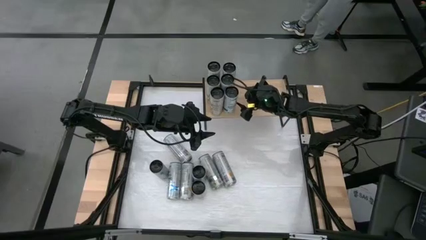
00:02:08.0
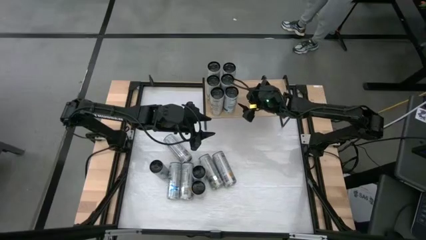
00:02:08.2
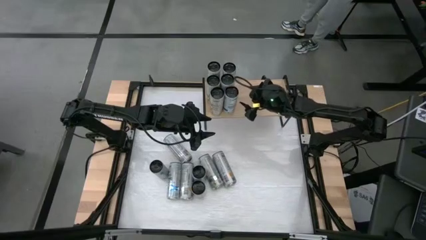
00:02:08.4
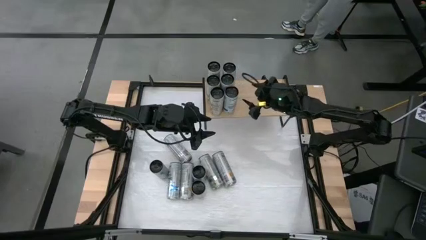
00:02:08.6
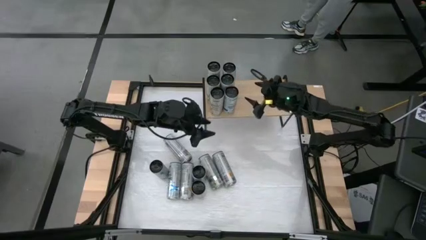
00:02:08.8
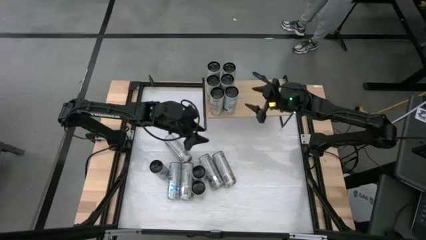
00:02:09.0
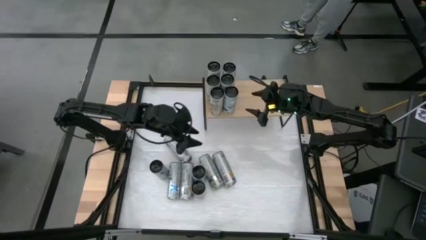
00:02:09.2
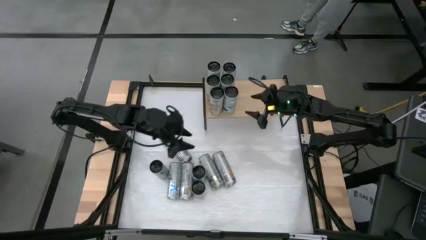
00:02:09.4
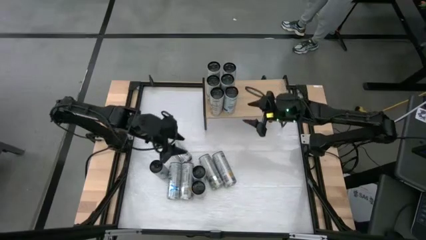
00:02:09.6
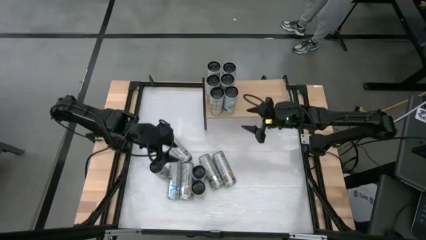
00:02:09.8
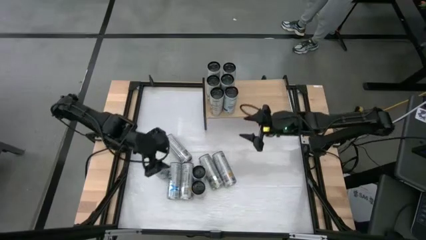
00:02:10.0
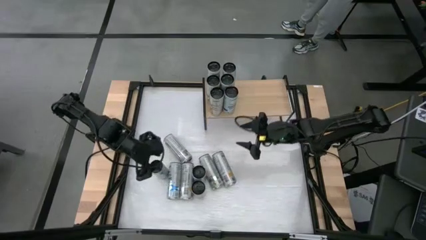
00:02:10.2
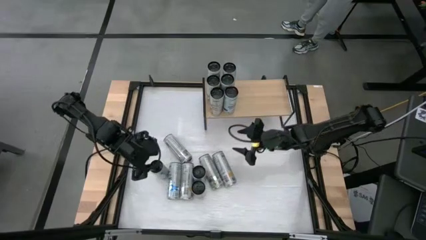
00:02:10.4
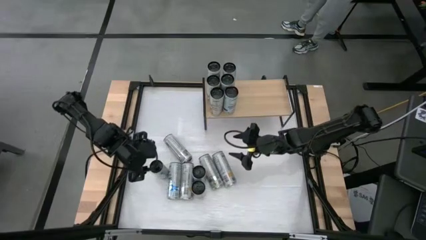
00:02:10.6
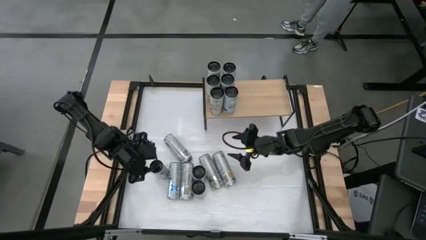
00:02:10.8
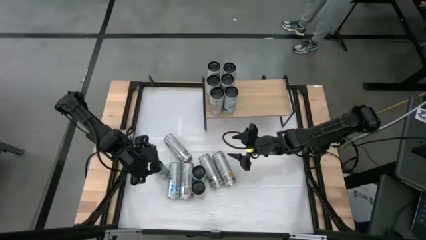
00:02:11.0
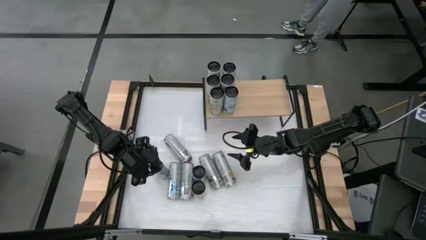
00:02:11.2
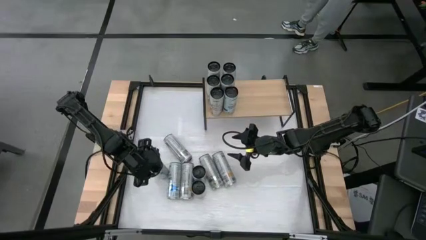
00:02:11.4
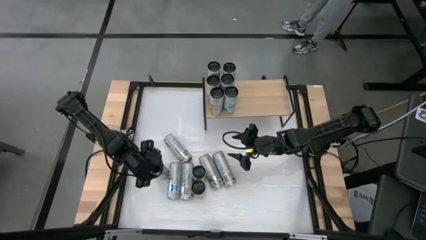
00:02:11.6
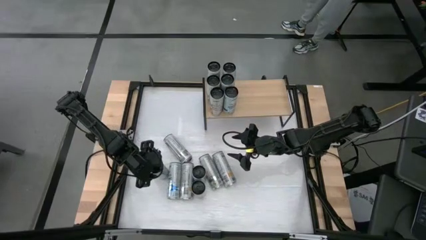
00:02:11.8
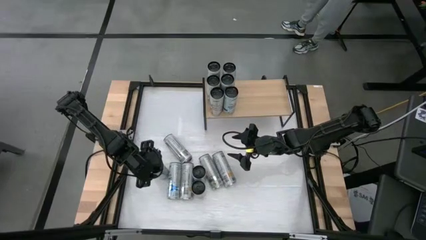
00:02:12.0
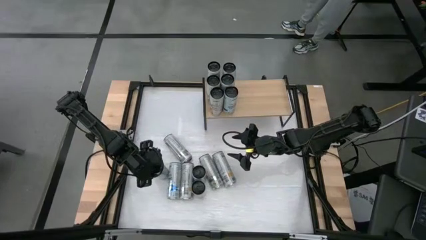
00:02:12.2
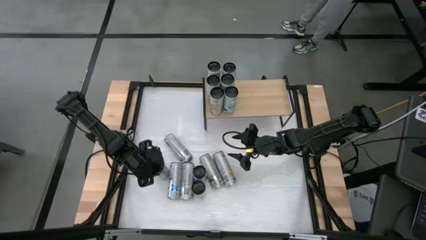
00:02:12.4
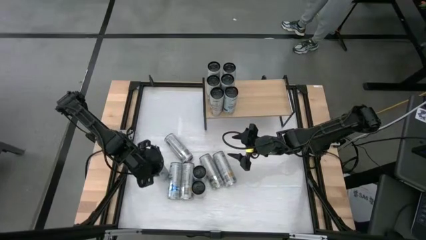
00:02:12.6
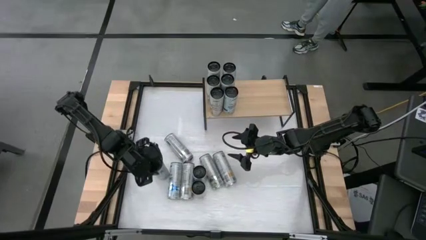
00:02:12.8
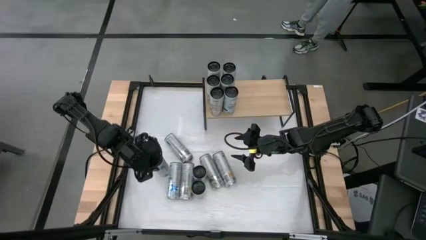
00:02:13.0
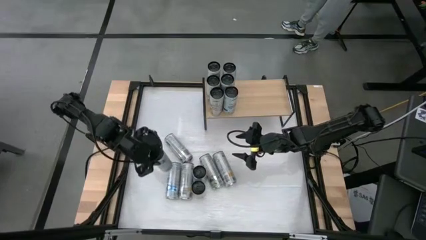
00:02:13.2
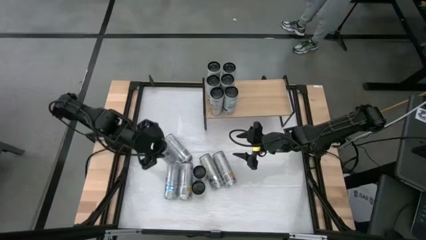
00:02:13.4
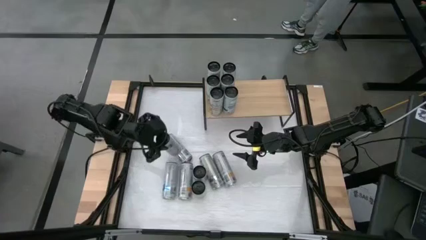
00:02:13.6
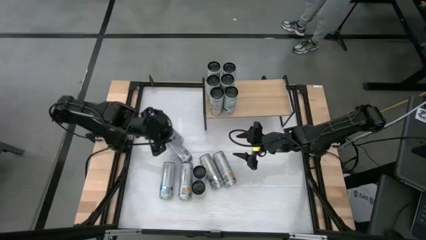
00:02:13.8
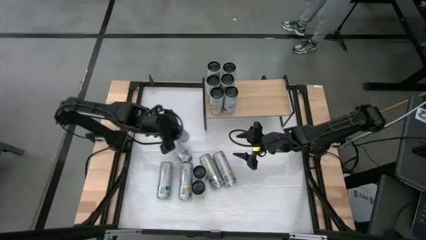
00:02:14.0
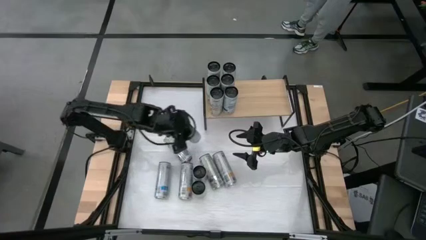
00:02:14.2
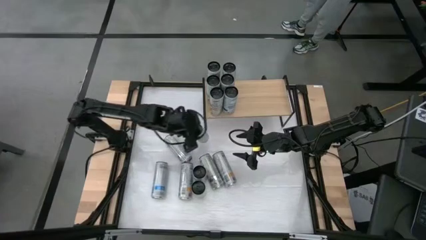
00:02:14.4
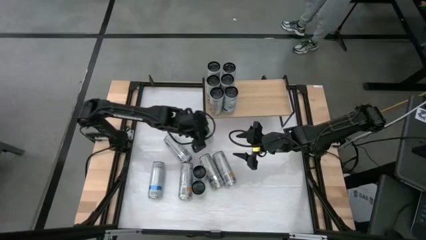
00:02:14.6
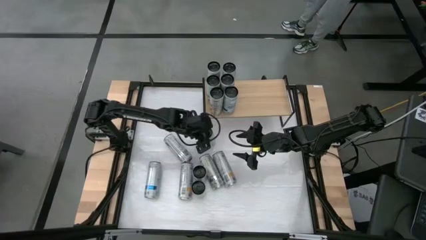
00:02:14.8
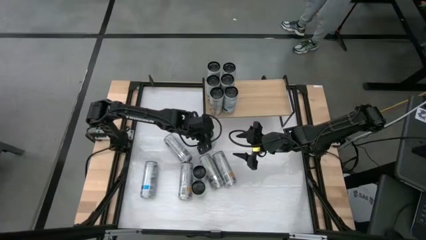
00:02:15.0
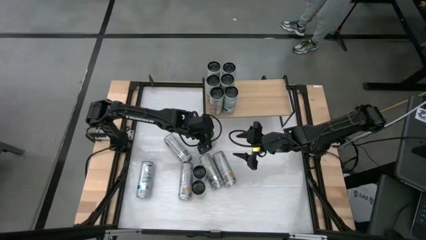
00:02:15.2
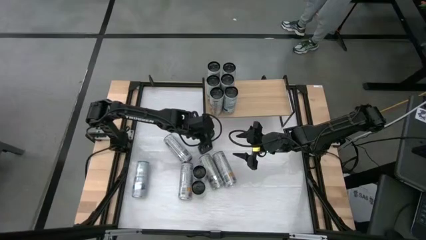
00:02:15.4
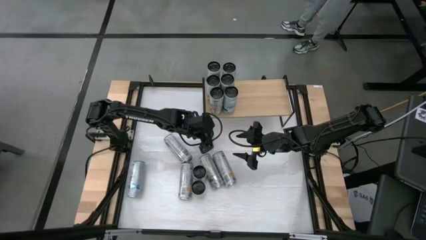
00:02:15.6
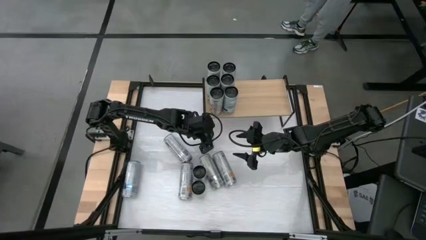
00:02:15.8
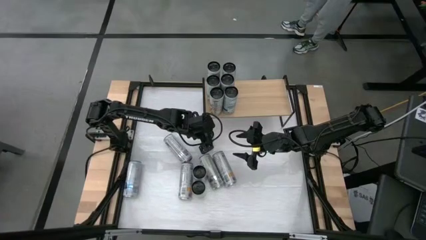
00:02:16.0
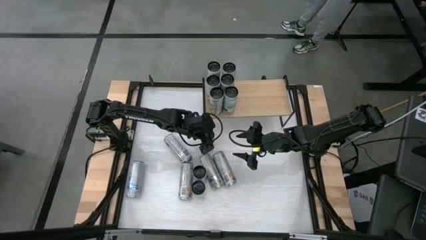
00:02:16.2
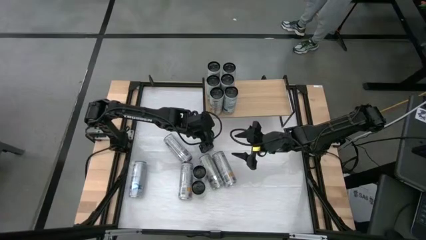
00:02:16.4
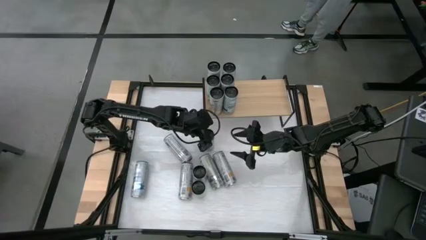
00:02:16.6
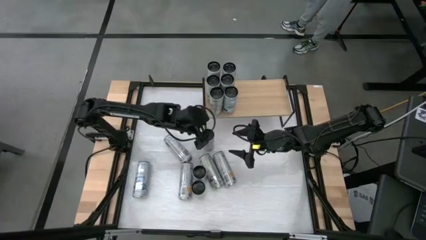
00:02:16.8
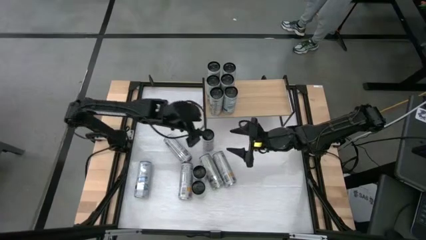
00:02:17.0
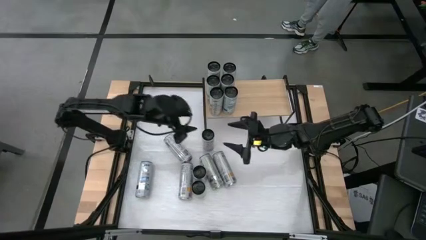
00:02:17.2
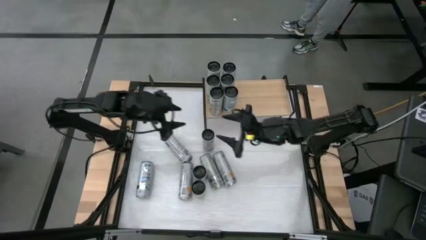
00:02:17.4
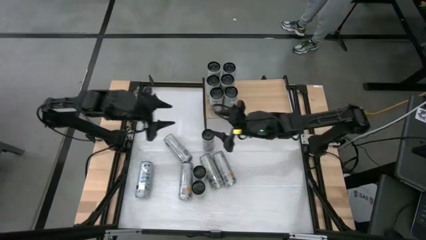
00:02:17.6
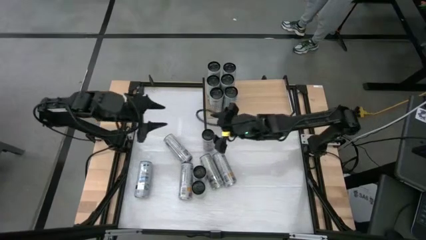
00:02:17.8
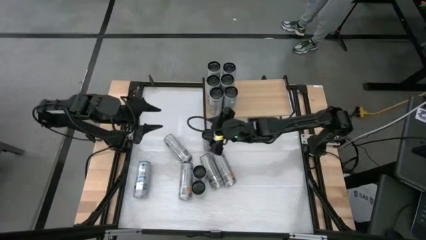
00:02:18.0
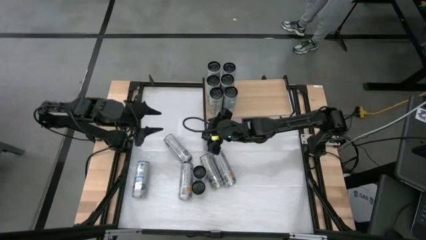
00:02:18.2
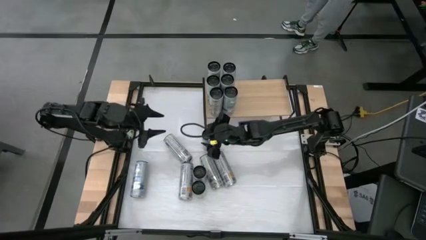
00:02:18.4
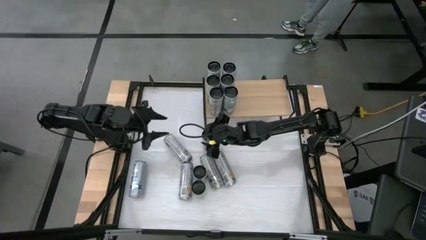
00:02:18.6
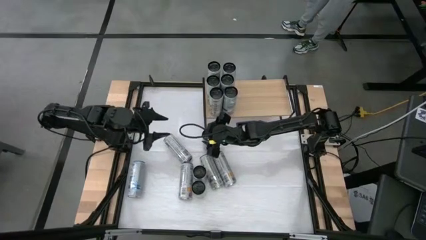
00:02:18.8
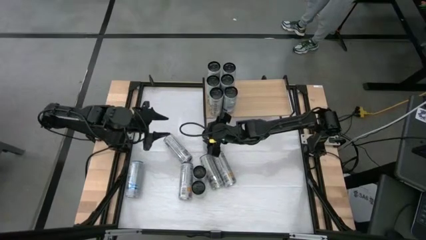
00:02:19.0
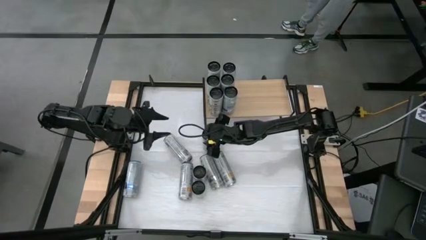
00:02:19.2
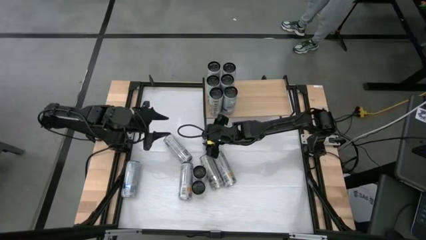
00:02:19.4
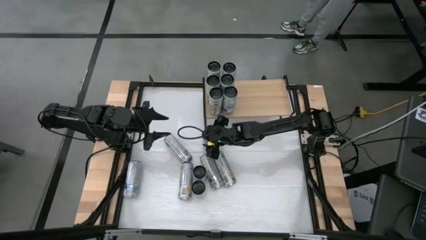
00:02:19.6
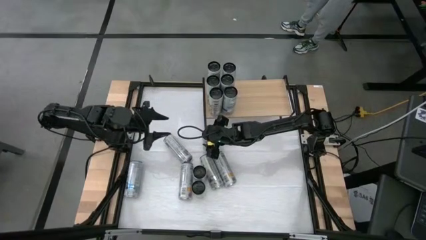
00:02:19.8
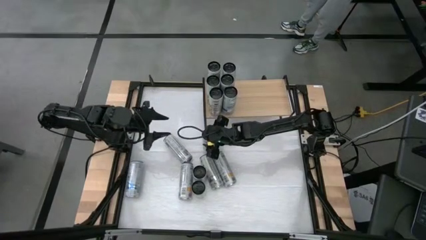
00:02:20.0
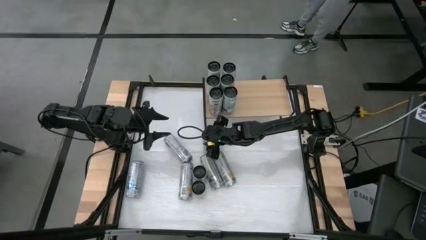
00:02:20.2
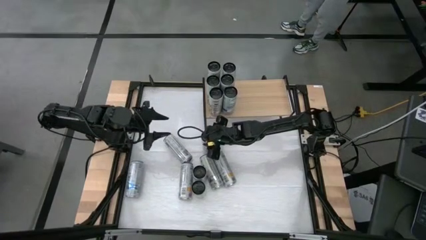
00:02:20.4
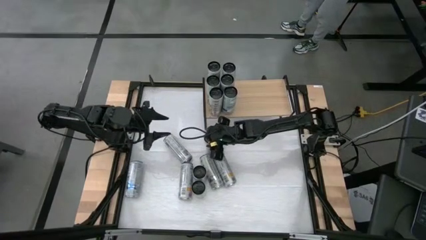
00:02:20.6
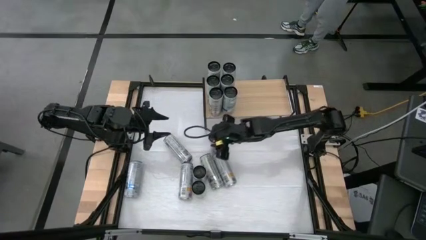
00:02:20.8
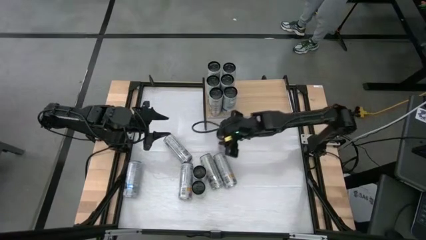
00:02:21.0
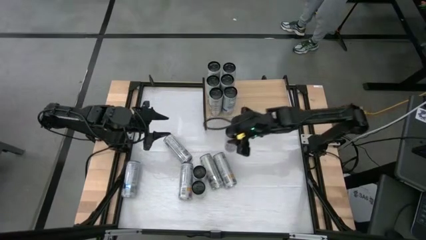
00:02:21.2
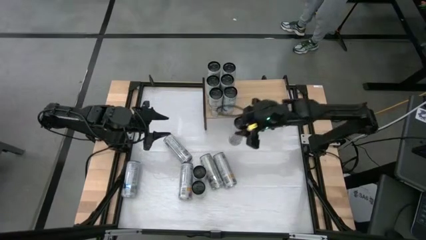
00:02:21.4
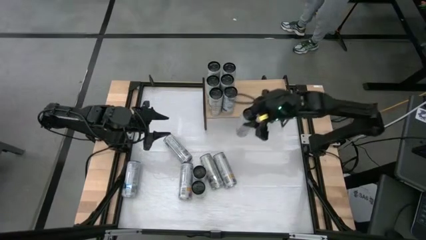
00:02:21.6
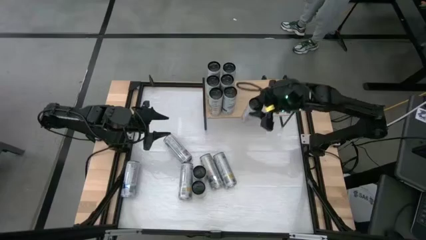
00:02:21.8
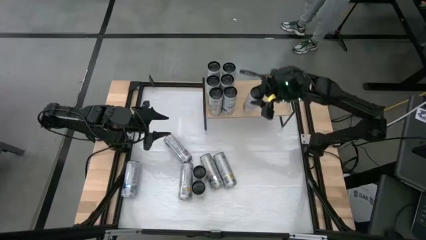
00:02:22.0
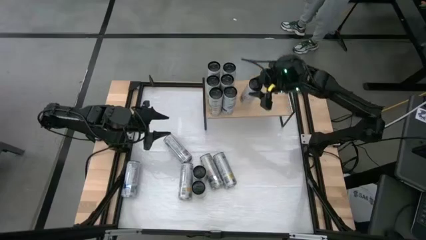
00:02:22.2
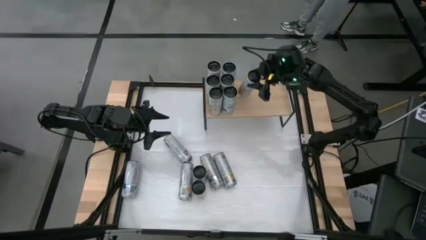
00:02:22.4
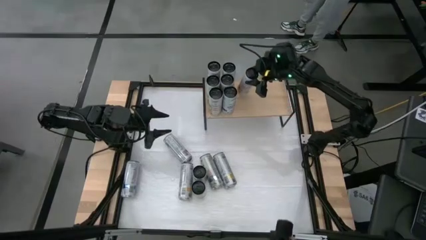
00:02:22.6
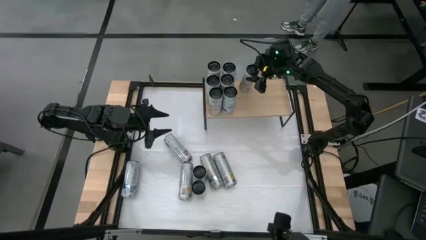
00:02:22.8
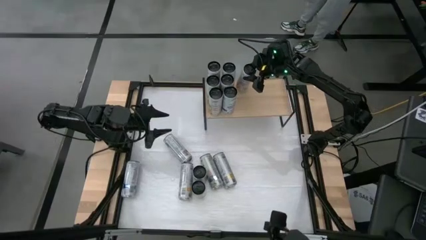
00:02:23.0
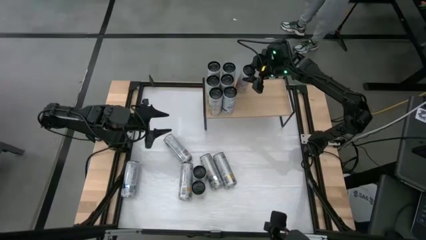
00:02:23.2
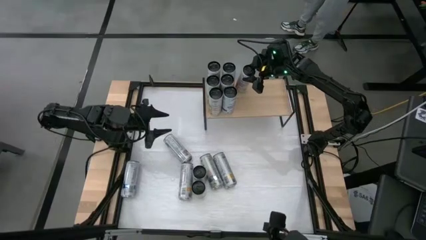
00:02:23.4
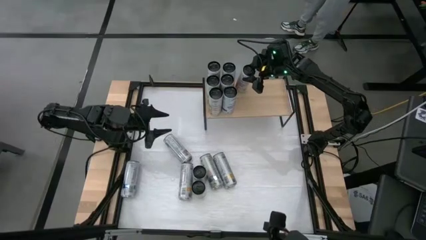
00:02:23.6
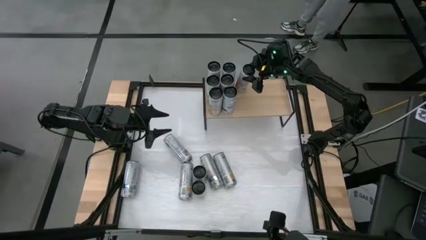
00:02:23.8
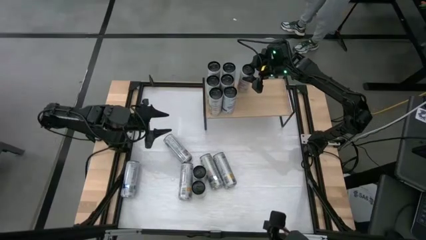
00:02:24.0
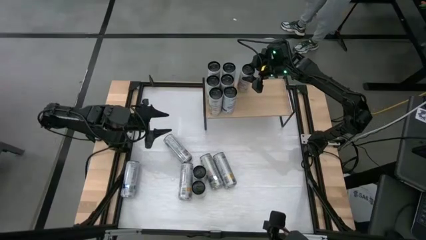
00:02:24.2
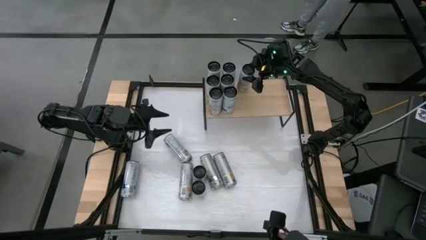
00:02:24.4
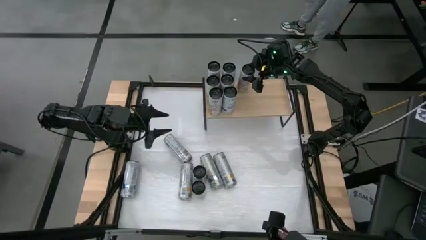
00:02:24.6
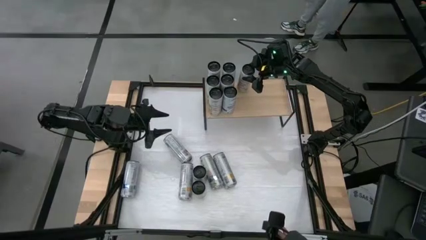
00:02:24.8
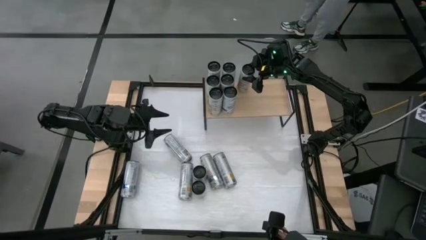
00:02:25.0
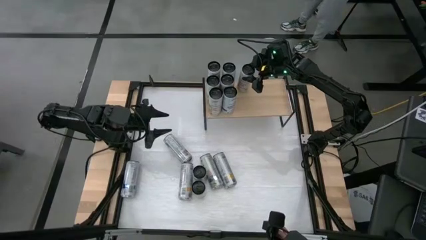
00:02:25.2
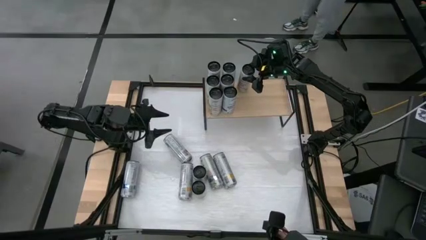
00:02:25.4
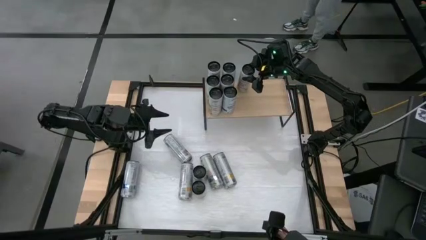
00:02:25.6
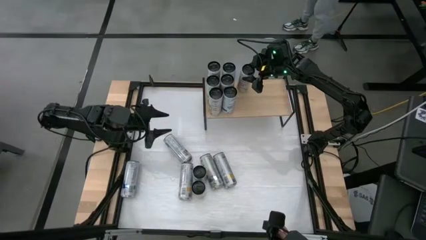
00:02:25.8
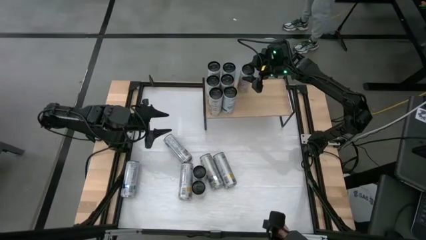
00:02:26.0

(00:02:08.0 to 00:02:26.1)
Task: Place canned beverage on shelf
Put the pink soda can on the shelf
